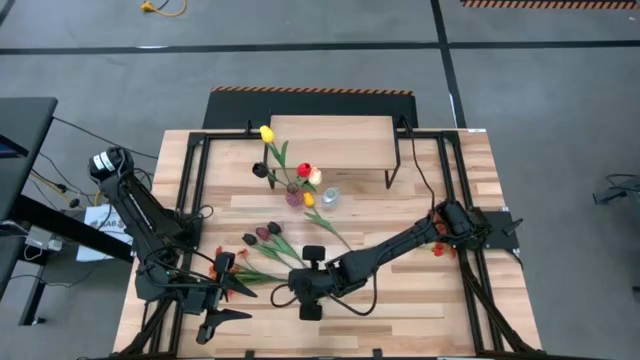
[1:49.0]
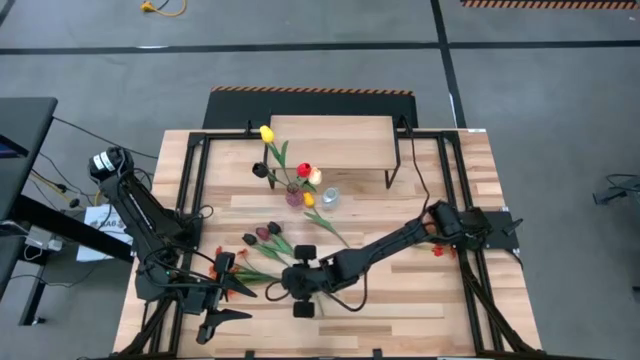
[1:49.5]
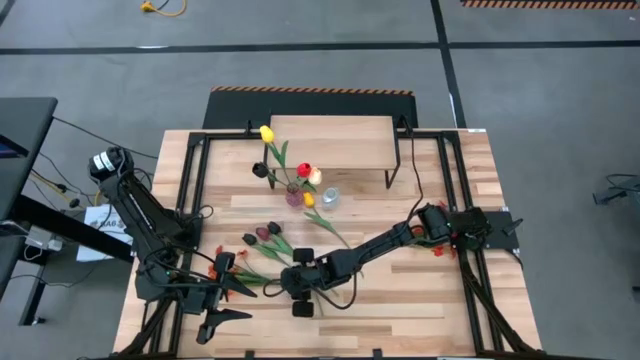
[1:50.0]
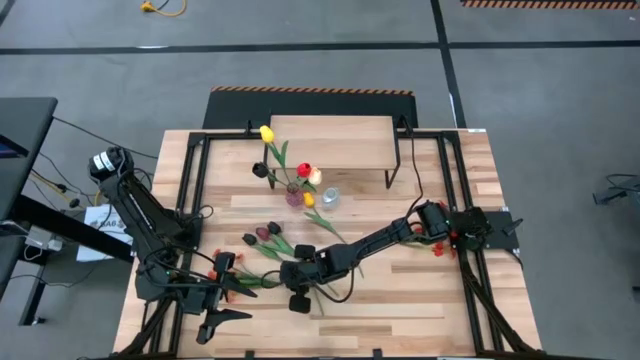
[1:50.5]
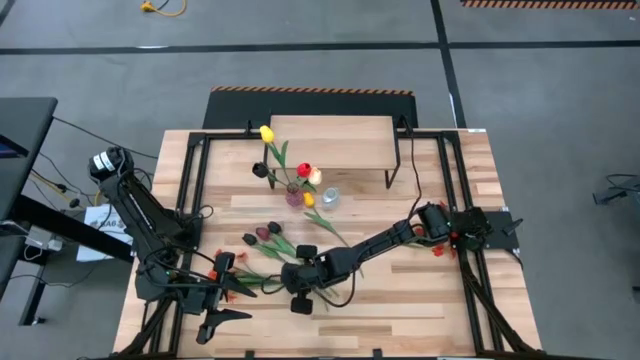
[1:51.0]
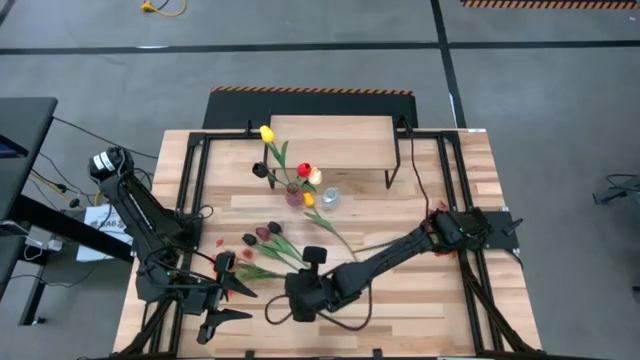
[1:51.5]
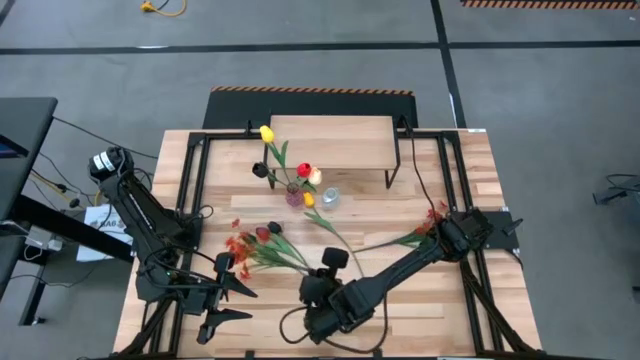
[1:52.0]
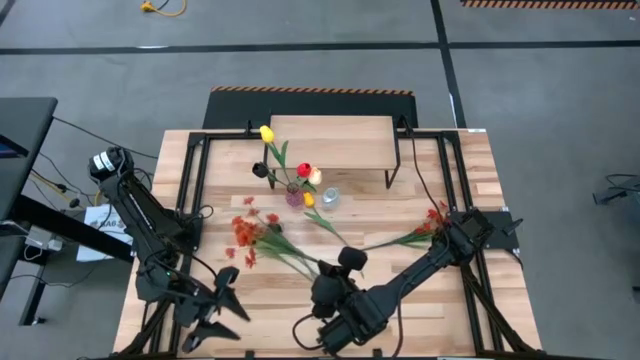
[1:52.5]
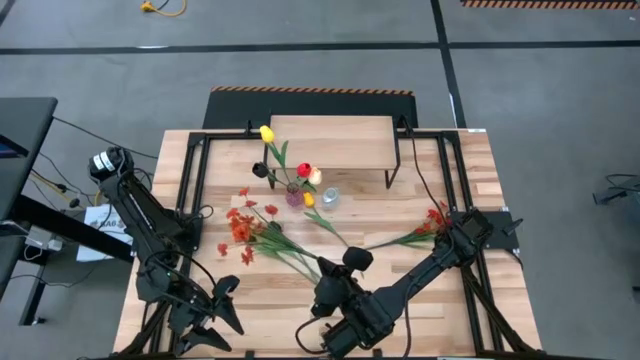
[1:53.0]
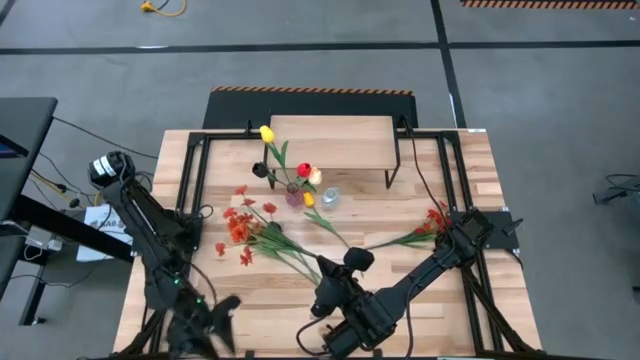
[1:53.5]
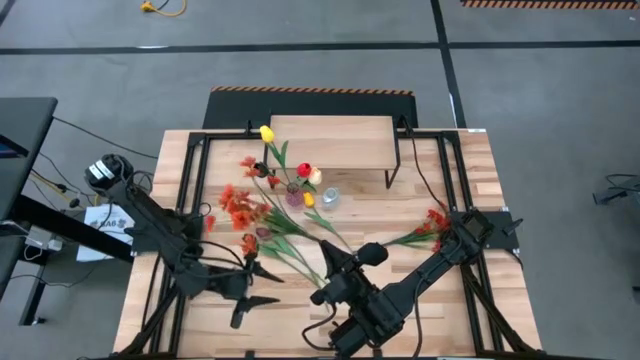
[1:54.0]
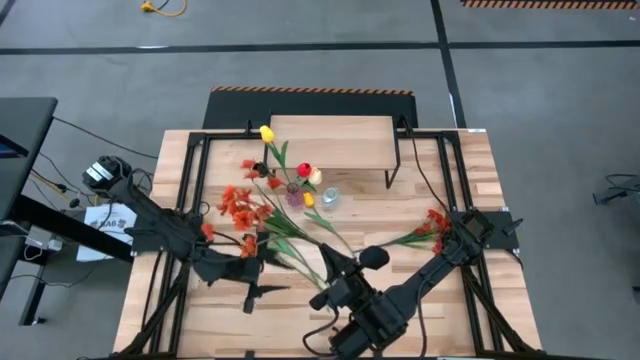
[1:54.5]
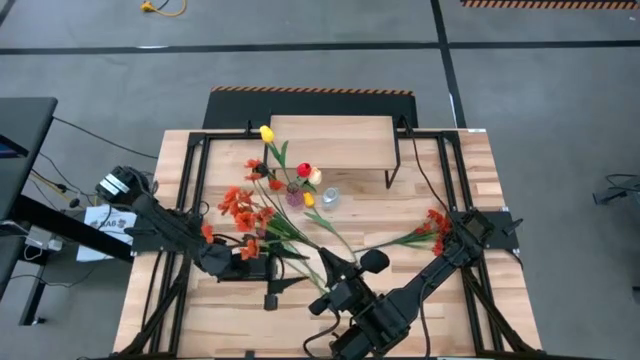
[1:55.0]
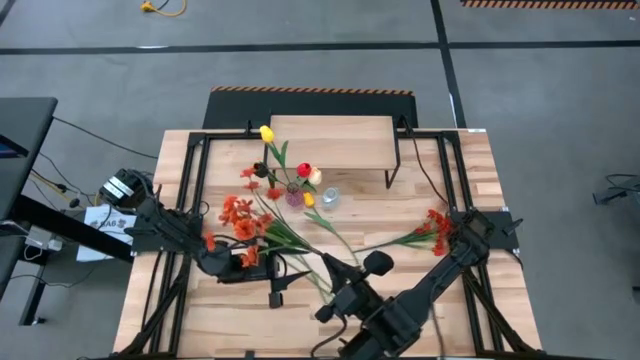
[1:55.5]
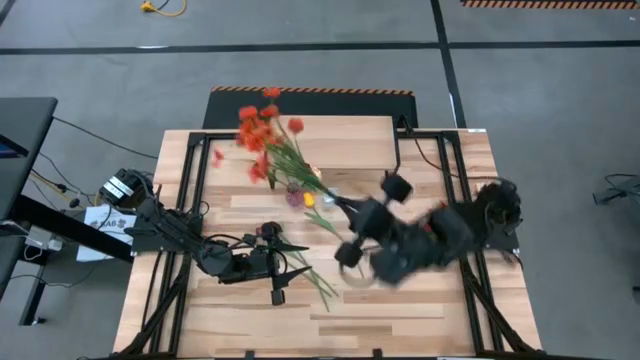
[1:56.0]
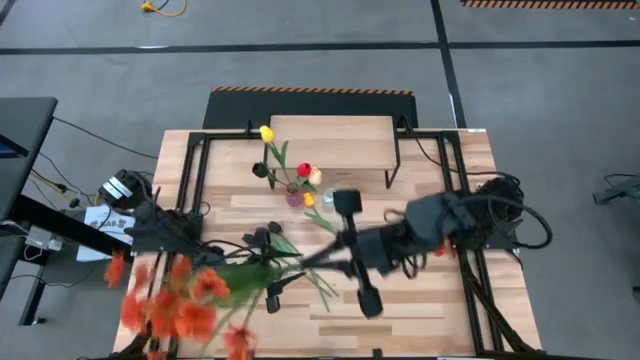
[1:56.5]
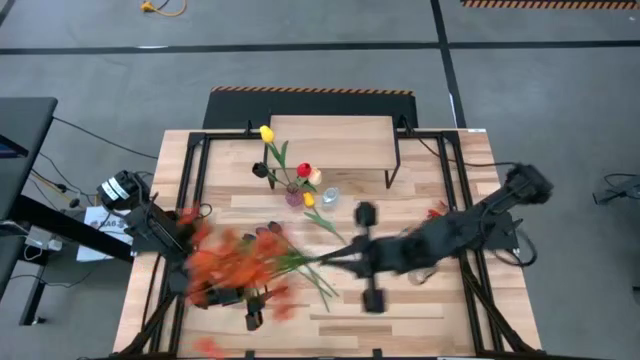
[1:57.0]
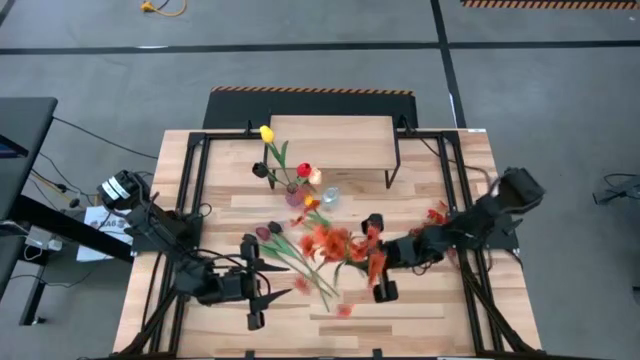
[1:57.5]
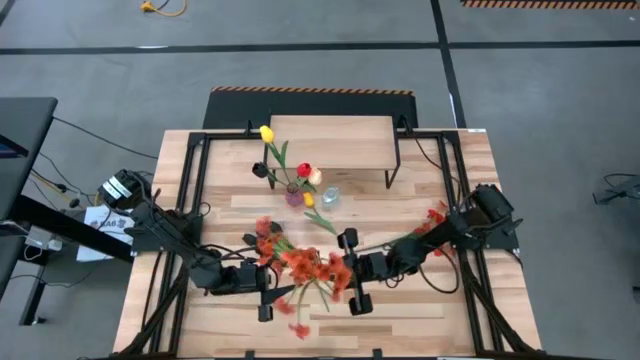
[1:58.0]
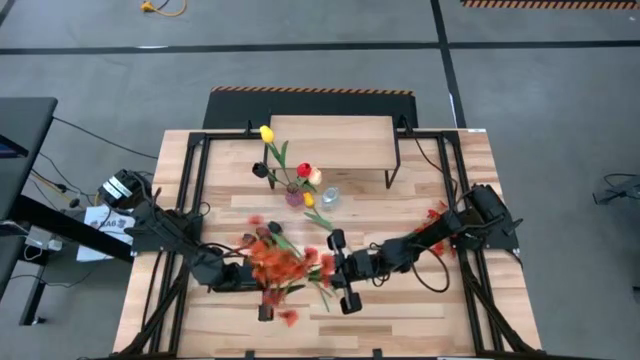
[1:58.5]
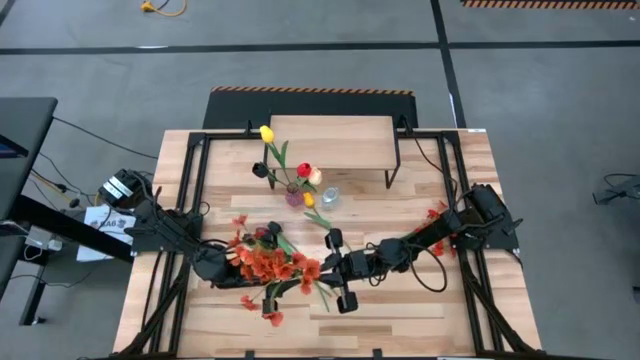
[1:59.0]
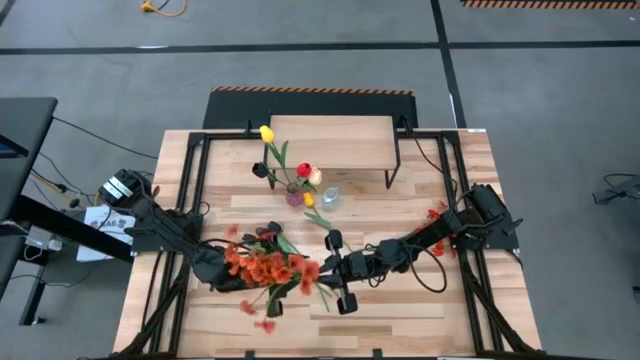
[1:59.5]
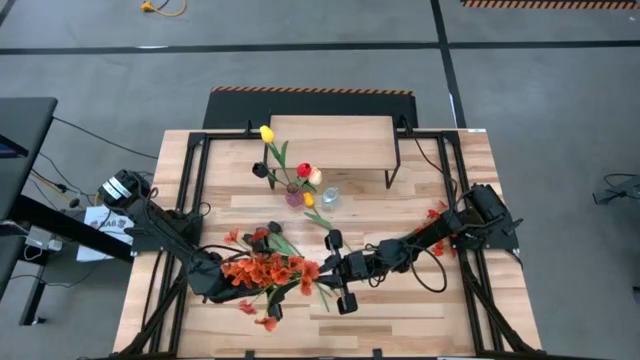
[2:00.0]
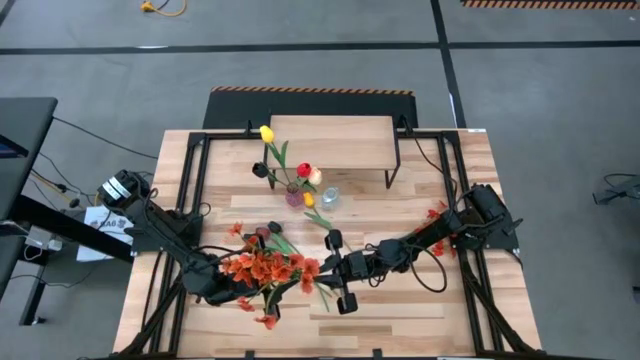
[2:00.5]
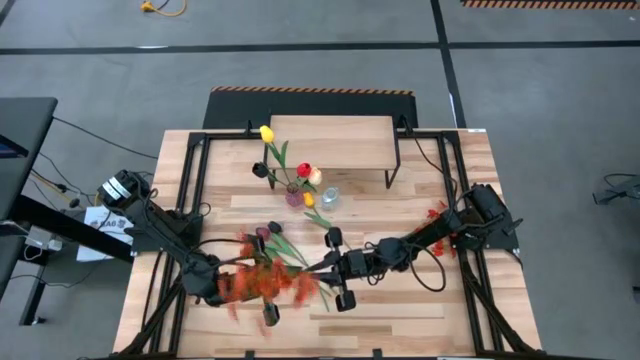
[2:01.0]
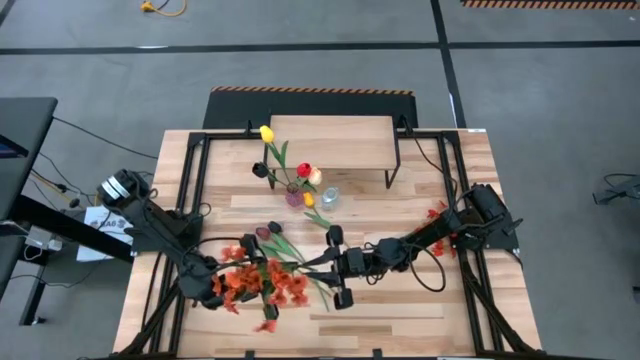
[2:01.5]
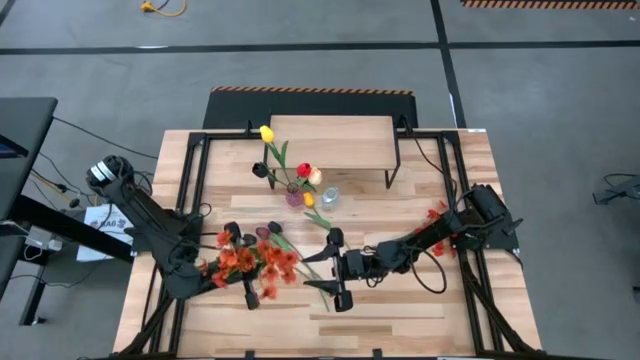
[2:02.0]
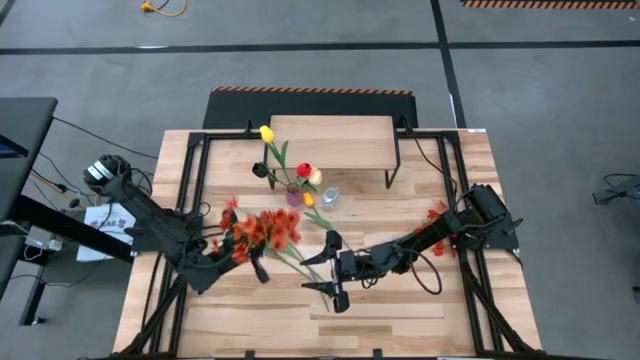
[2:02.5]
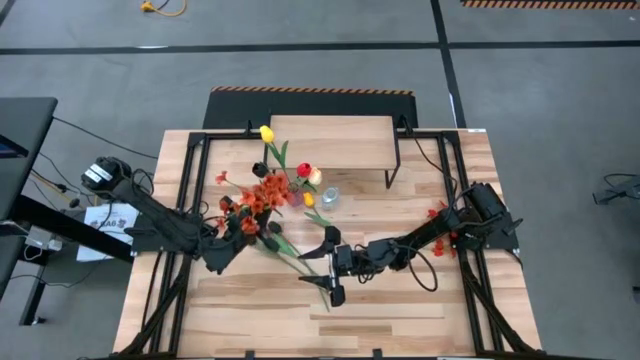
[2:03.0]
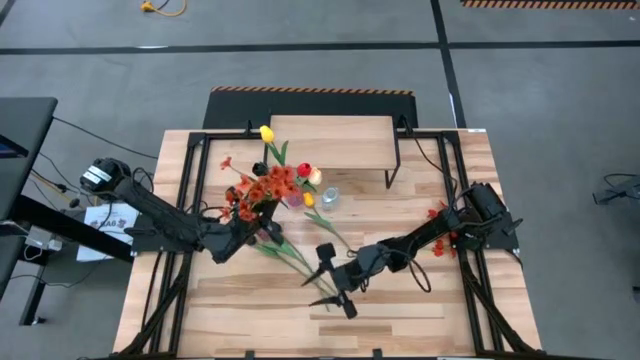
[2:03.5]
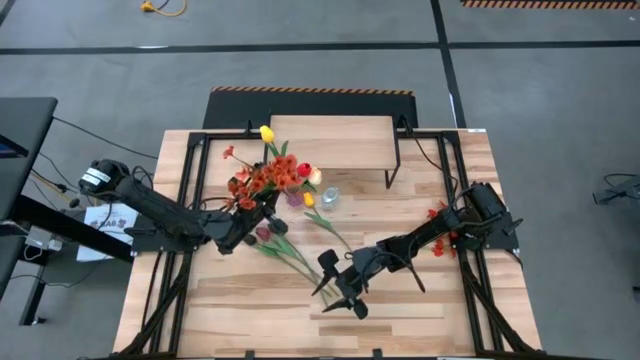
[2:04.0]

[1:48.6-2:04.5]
Task: Pick and place flowers into a vace then onto a shelf
Put the bottom orange flowers into the violet vase

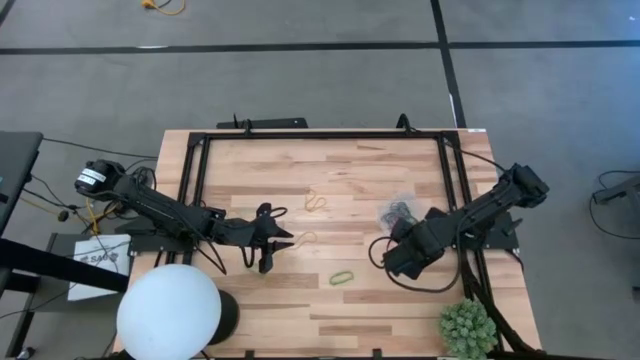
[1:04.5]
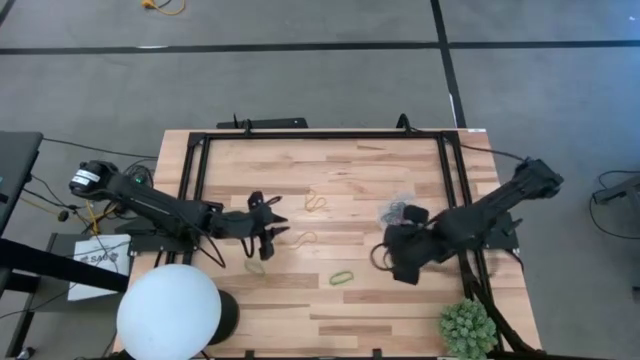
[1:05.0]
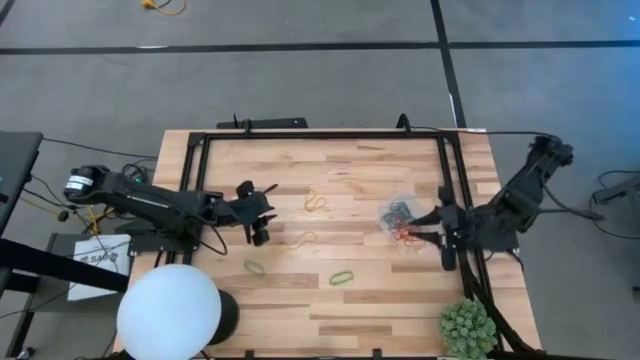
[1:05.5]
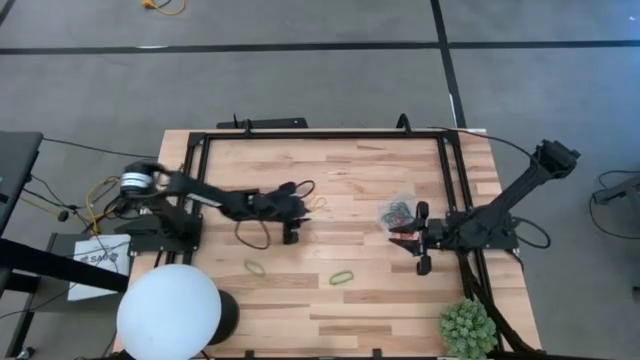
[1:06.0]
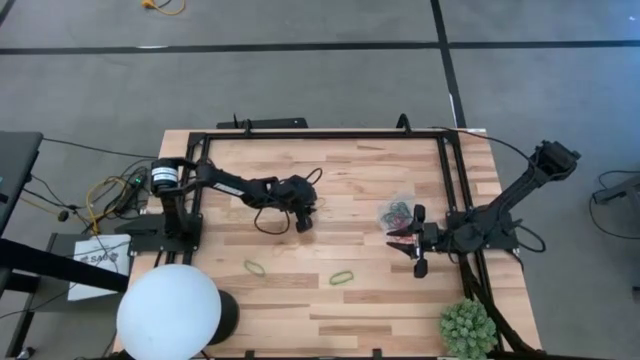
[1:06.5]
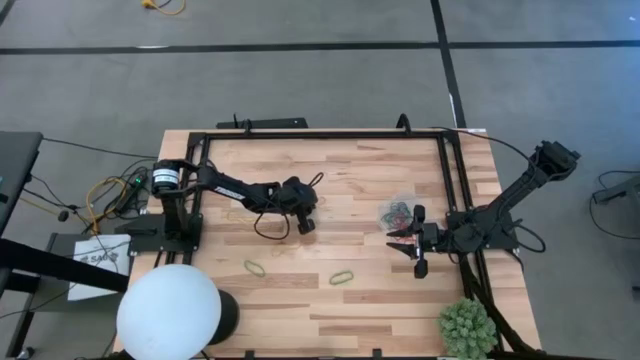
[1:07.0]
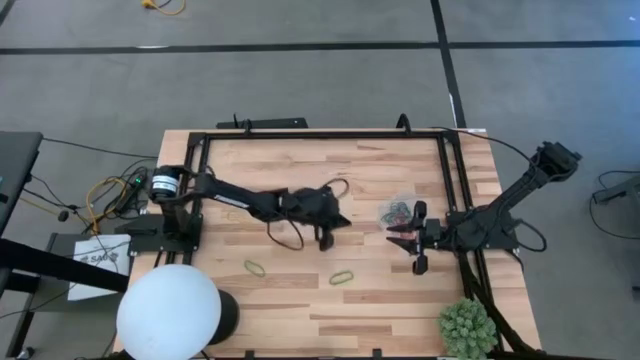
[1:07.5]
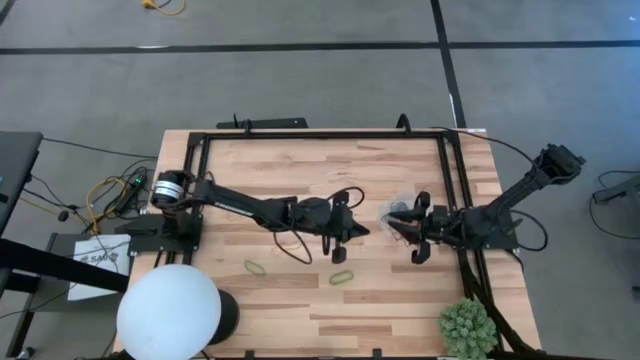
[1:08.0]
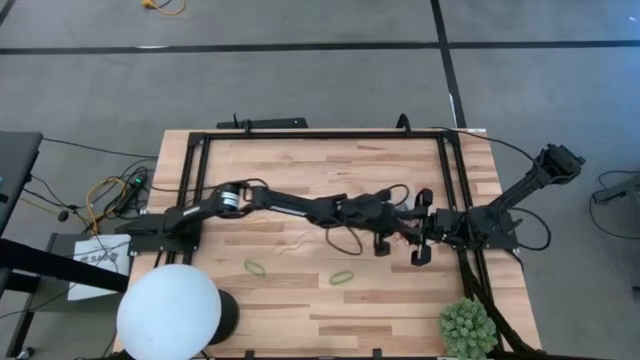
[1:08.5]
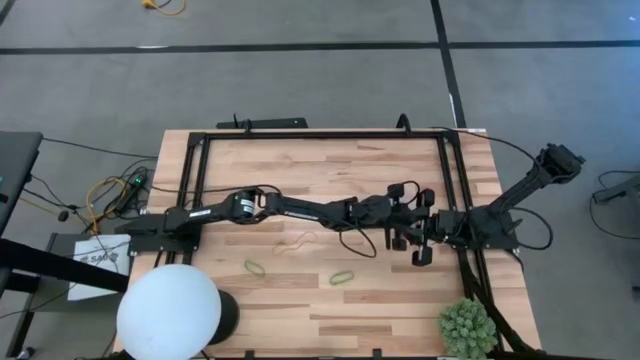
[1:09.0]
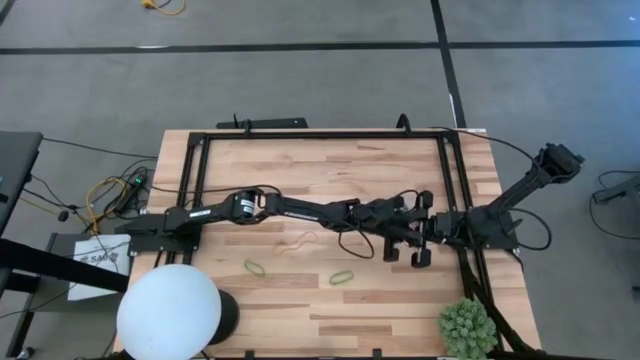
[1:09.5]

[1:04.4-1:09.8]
Task: Pick and place items into bin
Put the yellow rubber band into the transparent bin
